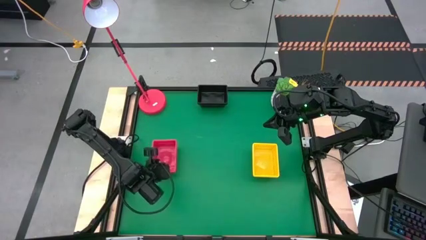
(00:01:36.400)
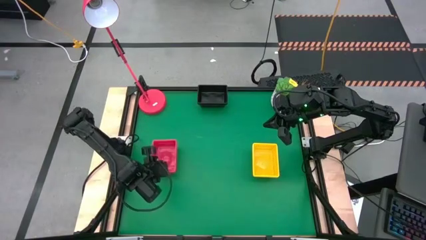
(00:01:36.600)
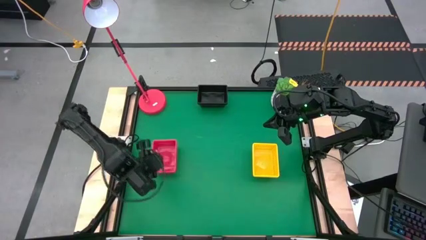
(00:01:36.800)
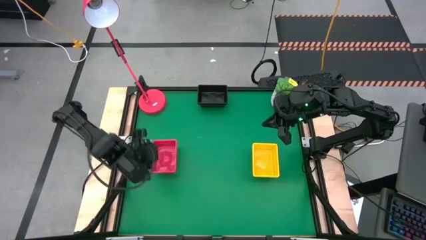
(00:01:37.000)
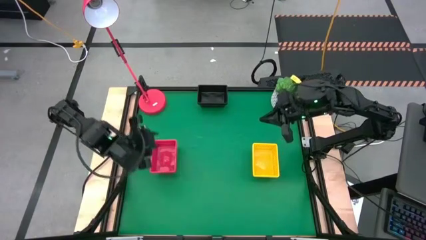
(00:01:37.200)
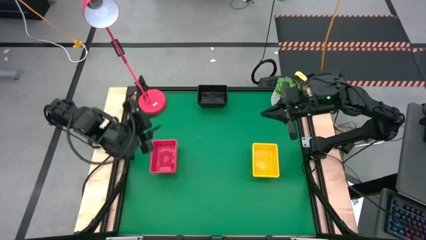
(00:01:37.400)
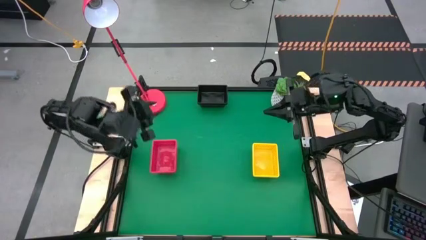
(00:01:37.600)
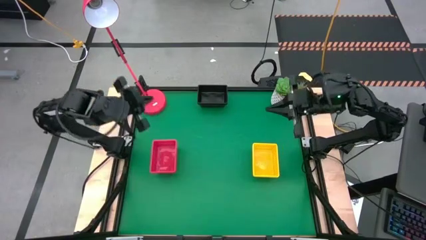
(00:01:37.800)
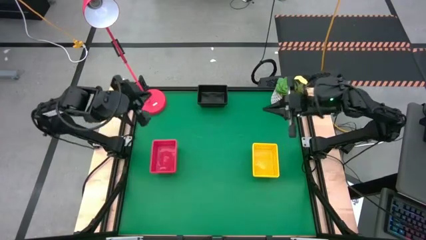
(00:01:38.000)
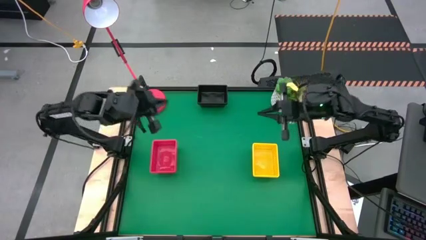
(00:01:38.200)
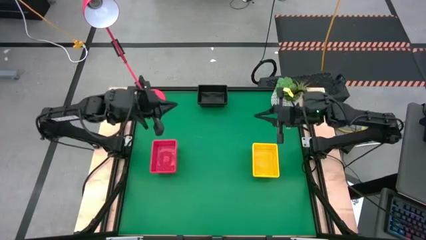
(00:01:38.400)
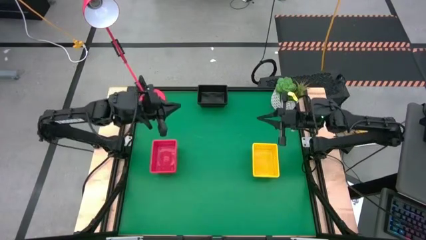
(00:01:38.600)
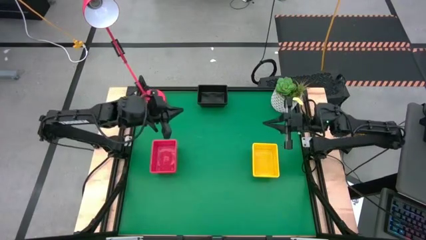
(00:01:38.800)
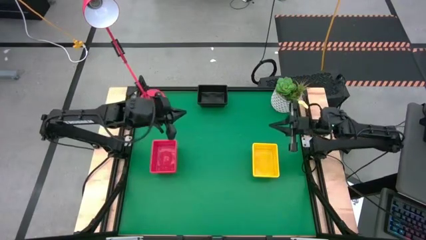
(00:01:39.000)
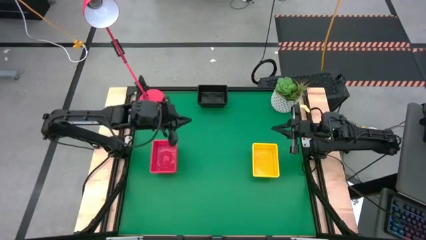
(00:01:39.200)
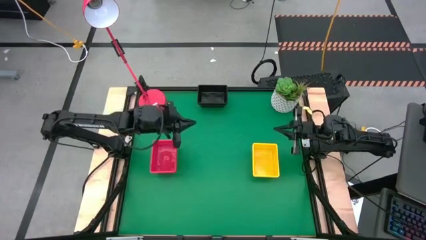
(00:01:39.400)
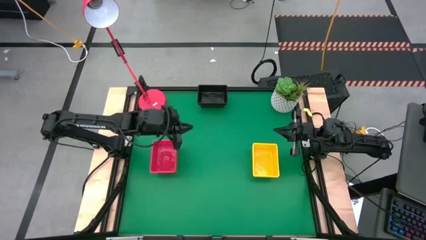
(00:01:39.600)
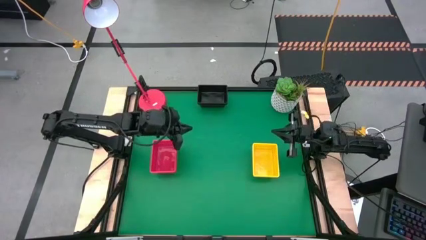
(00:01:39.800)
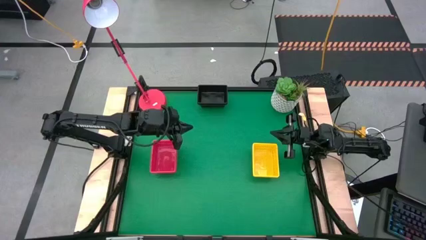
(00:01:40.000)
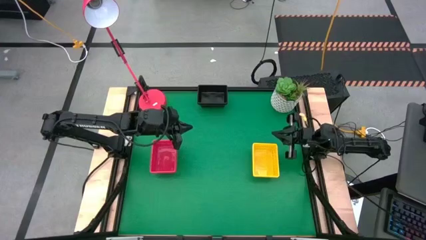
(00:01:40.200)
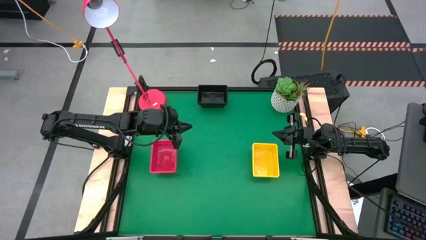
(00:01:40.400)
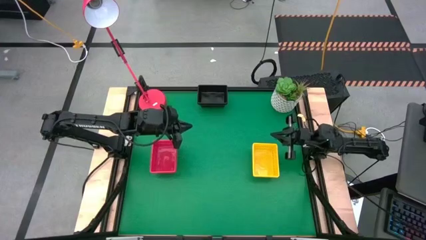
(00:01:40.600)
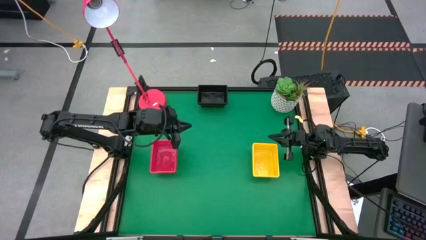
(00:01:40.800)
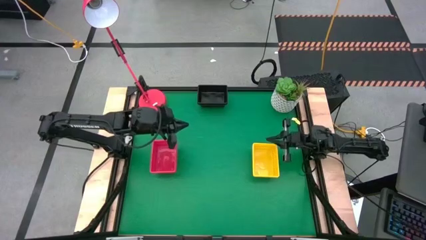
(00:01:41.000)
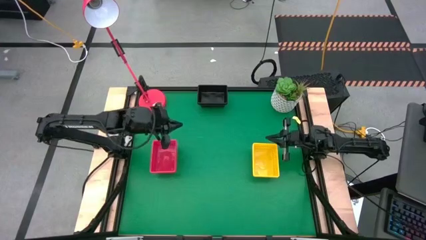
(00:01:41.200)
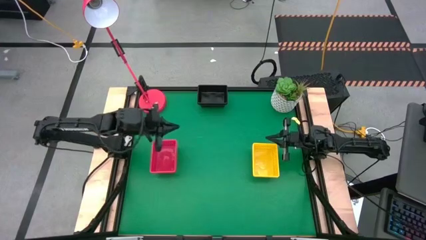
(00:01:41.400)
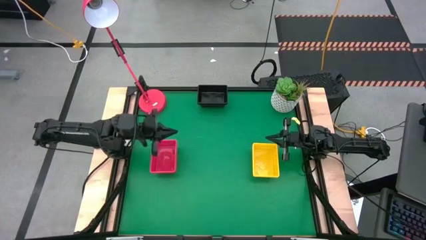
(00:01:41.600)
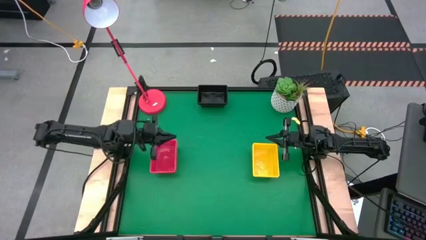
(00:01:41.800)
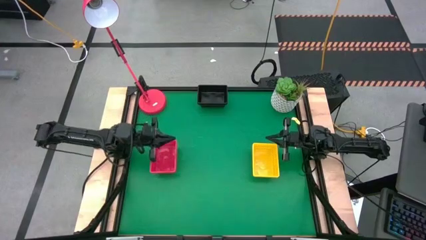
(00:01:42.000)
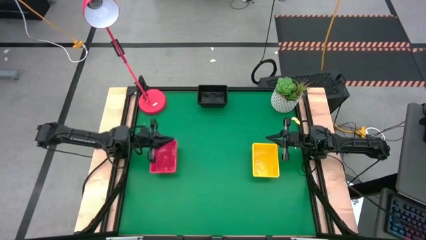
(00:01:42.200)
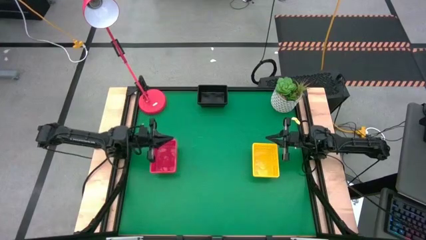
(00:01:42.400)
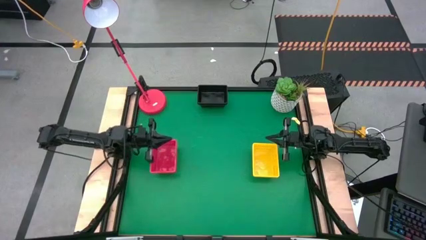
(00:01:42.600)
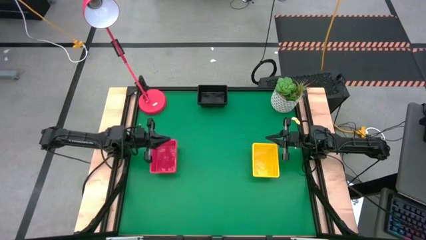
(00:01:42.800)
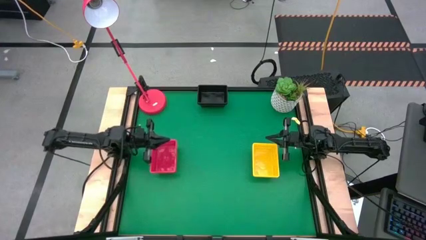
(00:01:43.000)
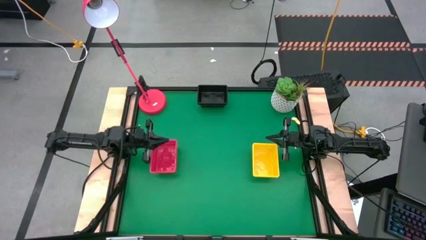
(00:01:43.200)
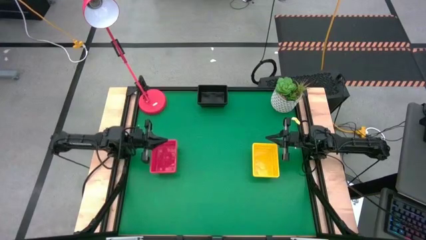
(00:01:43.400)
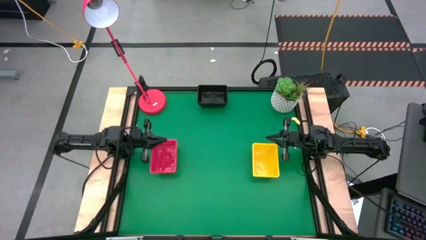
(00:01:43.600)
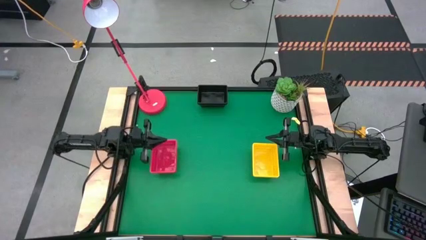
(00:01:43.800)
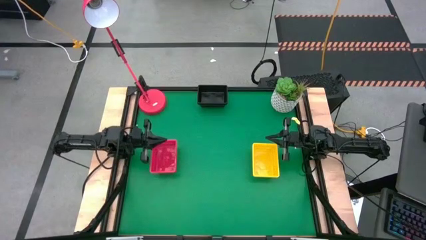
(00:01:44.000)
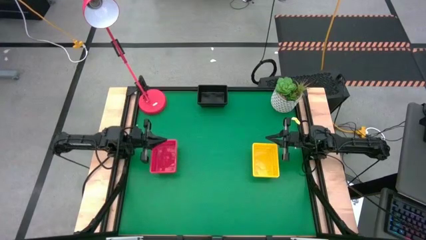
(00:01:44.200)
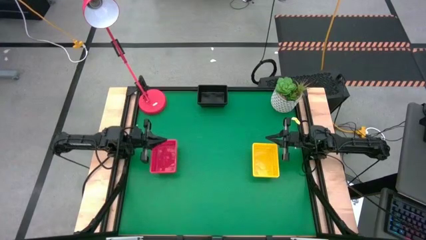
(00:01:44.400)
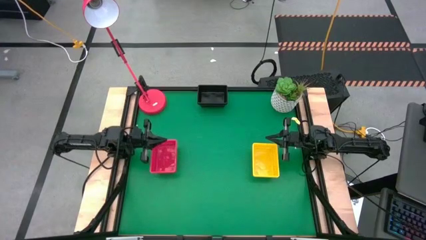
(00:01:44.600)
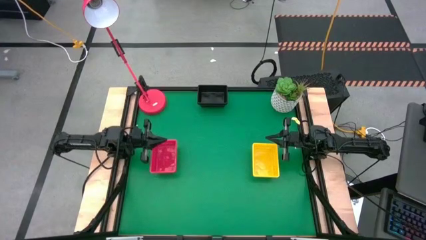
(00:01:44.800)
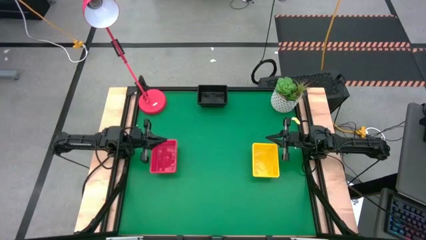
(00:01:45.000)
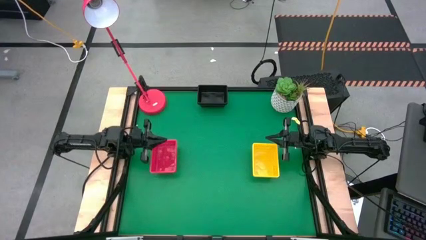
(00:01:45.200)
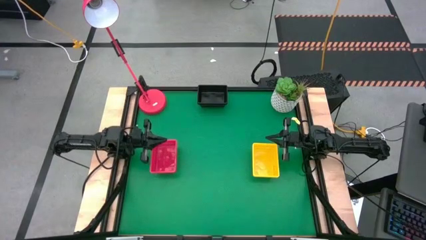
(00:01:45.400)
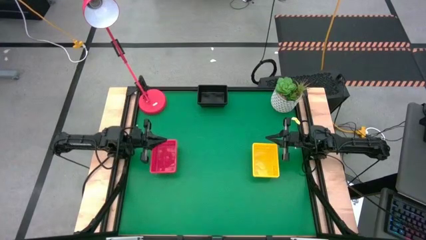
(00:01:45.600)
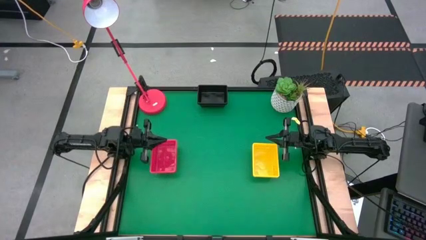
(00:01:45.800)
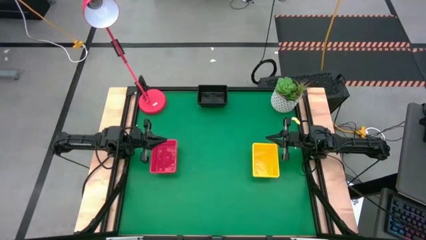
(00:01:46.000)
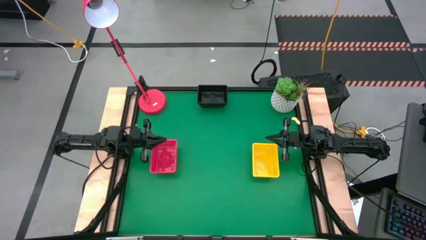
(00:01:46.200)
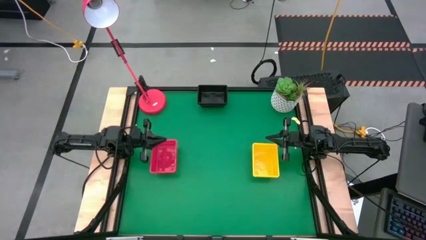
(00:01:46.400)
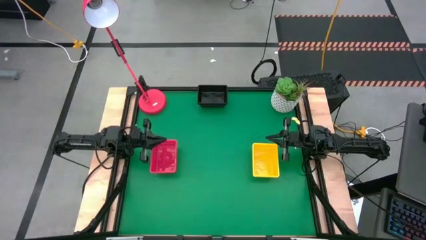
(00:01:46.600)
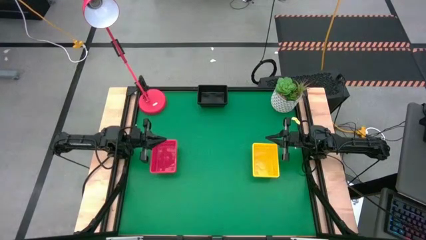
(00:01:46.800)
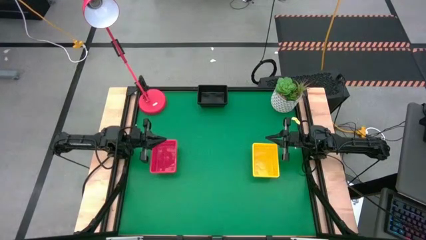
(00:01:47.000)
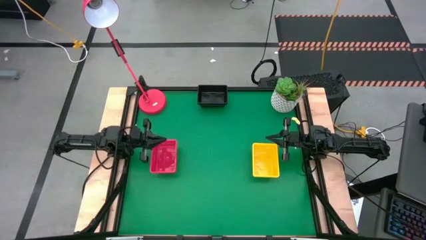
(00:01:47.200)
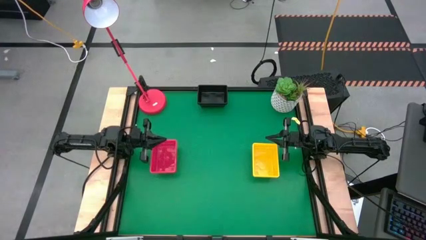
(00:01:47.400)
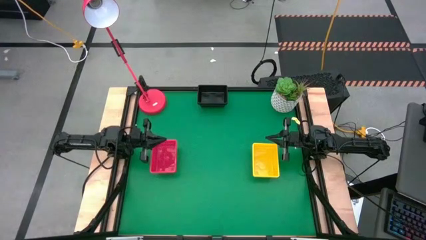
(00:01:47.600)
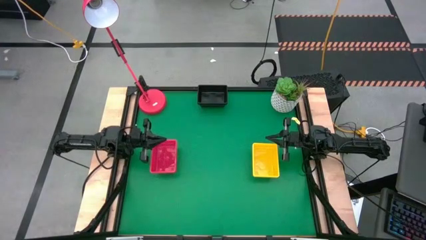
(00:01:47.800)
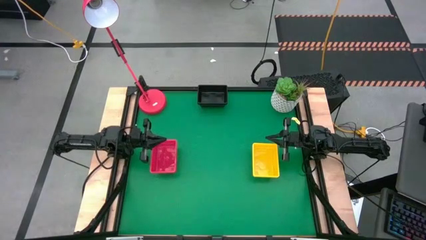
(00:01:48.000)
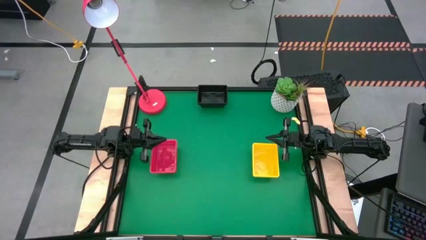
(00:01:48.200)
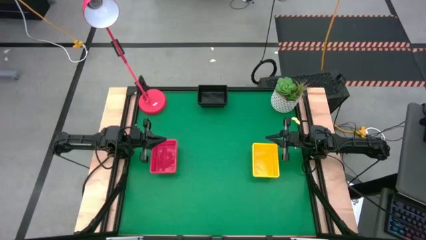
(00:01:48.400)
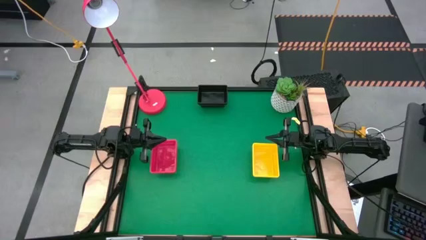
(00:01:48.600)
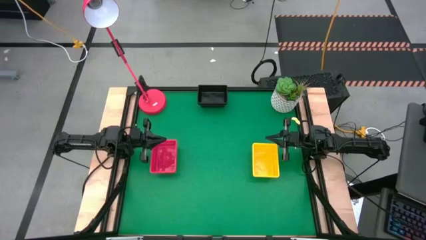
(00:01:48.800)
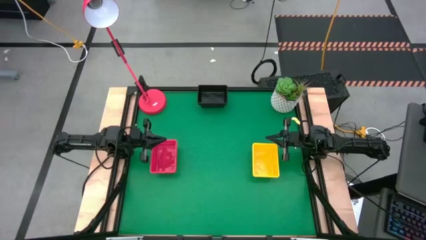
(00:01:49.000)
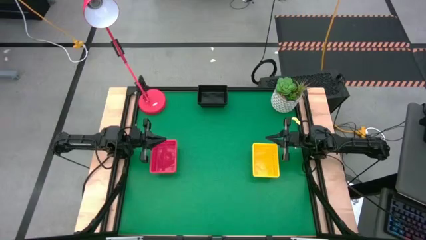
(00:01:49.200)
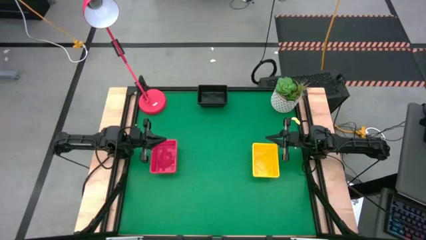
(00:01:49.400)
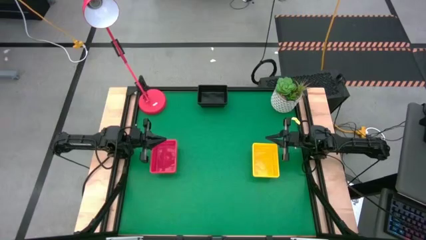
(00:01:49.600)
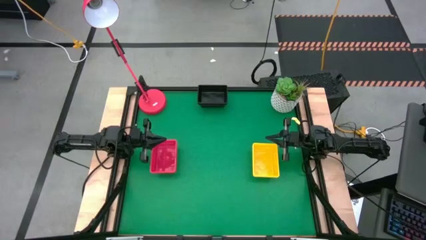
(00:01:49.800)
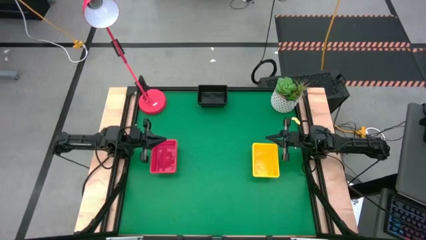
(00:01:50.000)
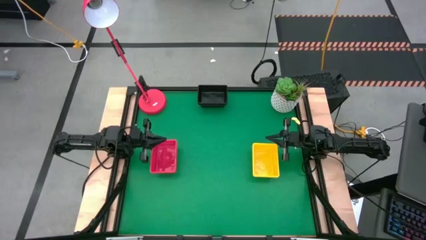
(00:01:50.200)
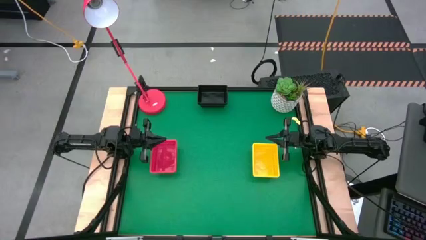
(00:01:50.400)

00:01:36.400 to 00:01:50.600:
Return to Home Position
